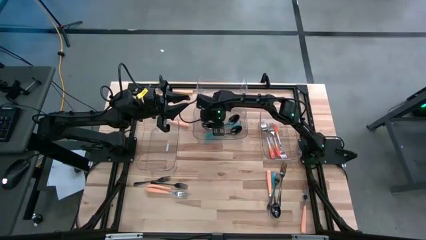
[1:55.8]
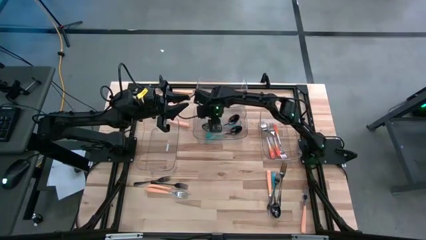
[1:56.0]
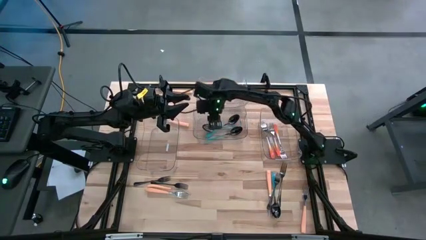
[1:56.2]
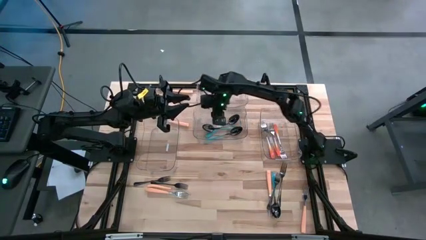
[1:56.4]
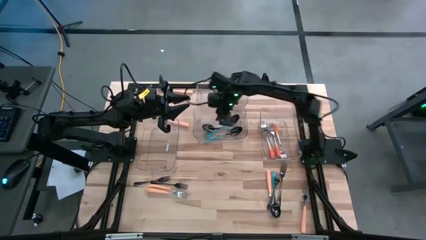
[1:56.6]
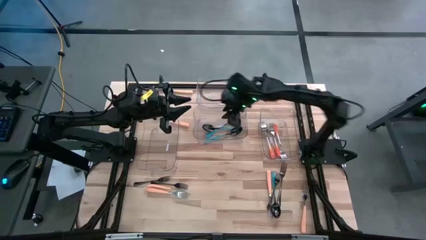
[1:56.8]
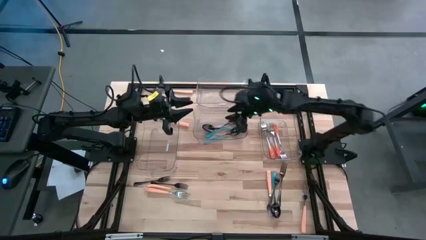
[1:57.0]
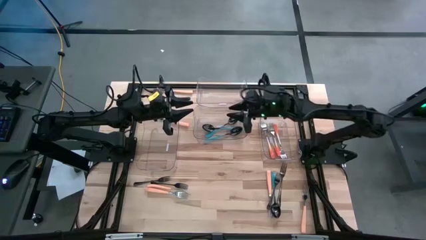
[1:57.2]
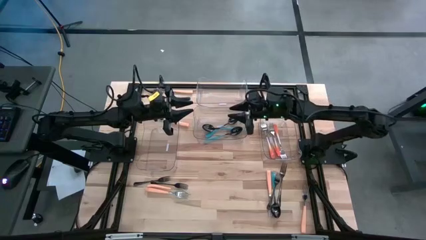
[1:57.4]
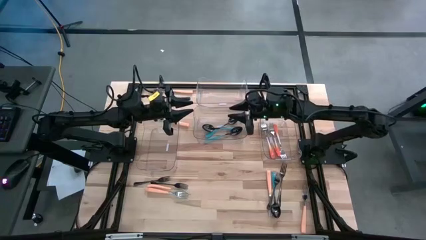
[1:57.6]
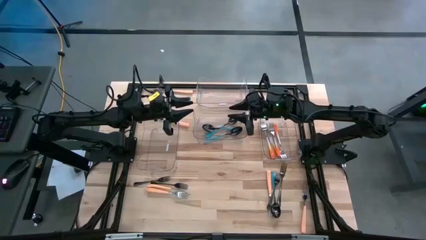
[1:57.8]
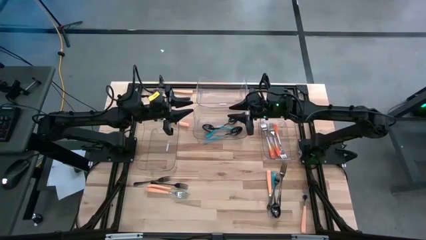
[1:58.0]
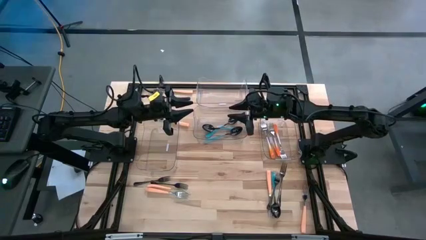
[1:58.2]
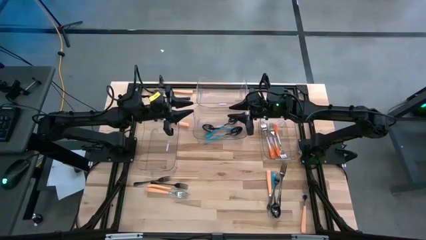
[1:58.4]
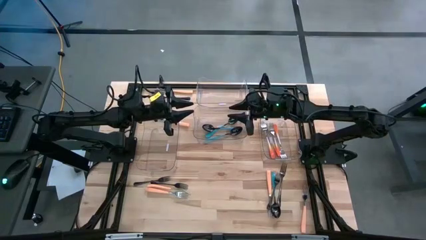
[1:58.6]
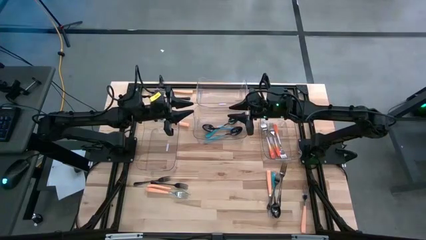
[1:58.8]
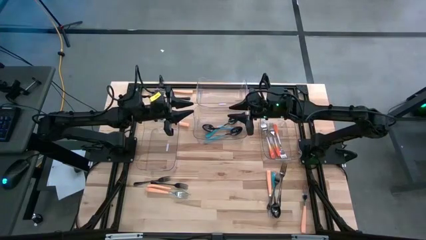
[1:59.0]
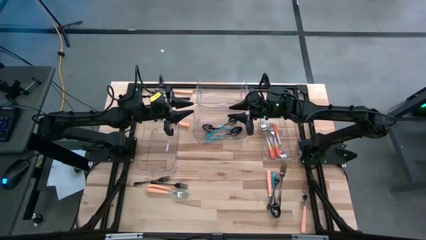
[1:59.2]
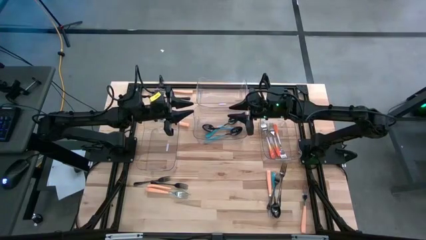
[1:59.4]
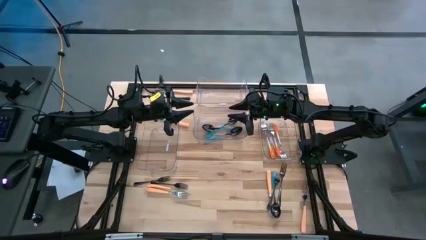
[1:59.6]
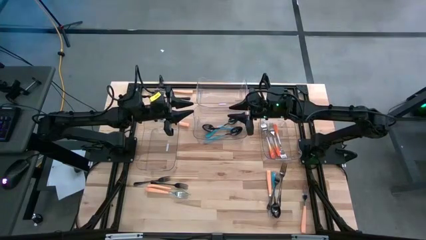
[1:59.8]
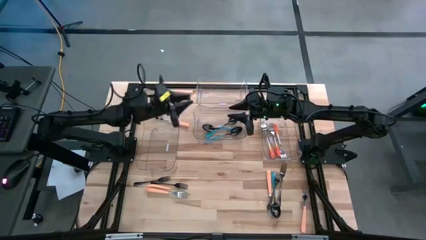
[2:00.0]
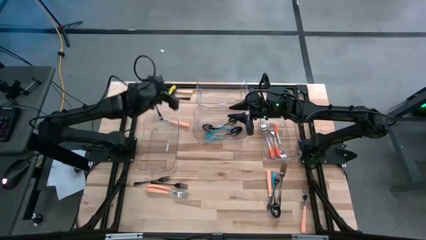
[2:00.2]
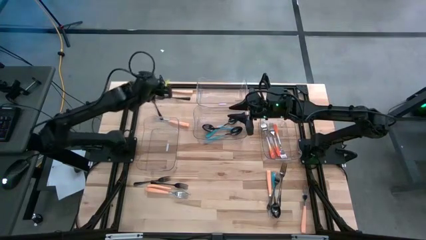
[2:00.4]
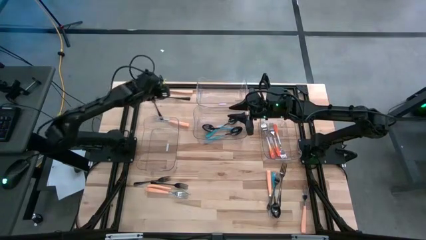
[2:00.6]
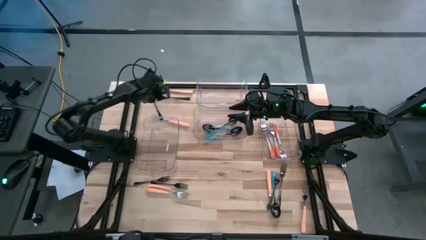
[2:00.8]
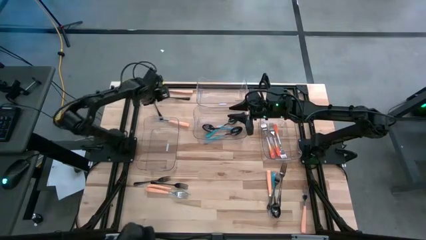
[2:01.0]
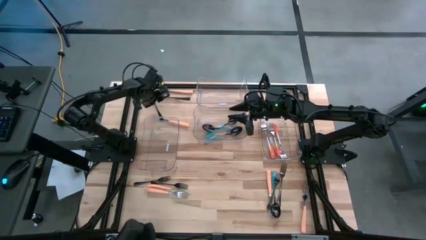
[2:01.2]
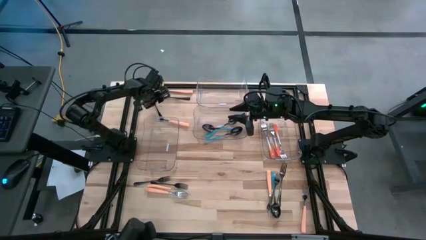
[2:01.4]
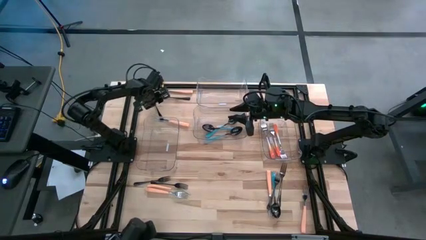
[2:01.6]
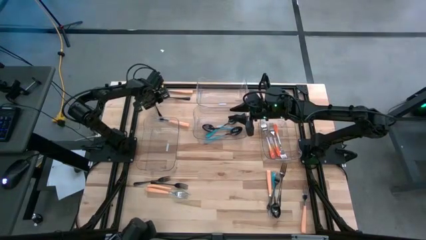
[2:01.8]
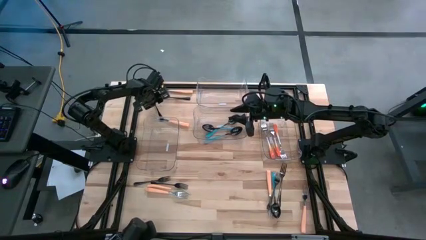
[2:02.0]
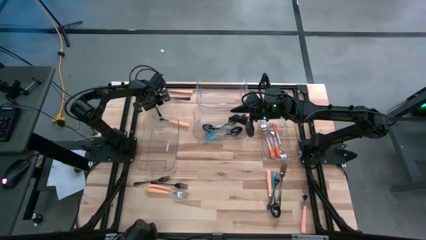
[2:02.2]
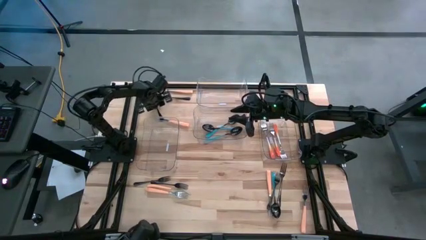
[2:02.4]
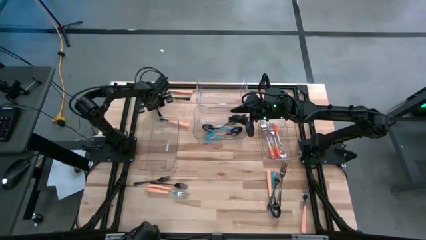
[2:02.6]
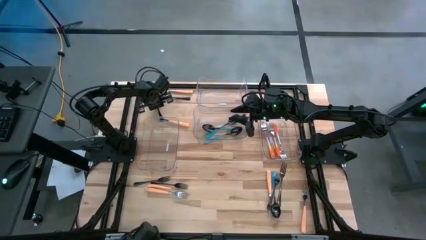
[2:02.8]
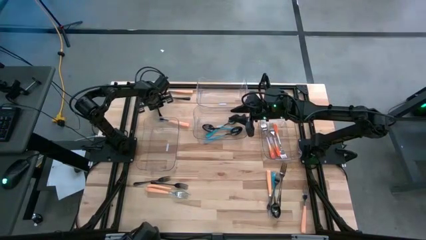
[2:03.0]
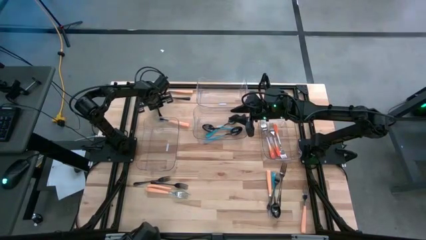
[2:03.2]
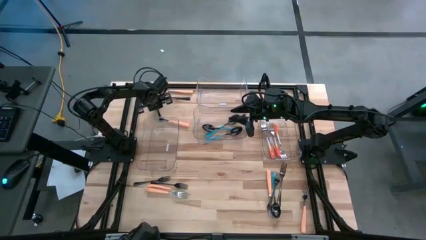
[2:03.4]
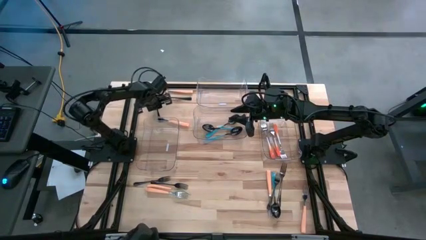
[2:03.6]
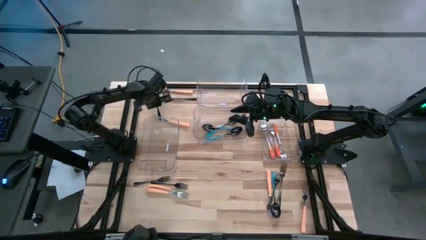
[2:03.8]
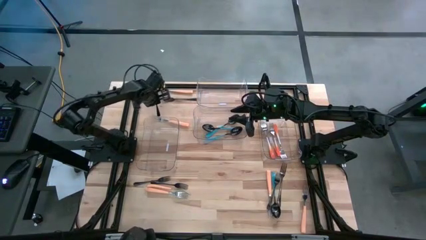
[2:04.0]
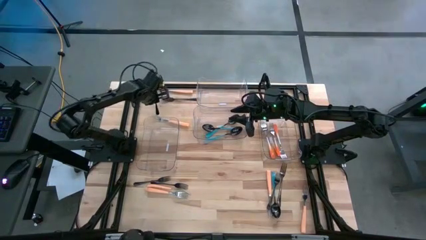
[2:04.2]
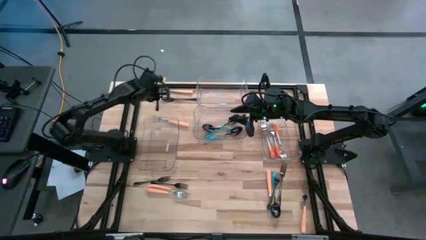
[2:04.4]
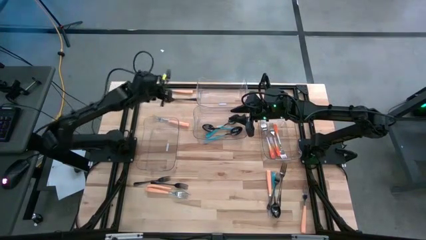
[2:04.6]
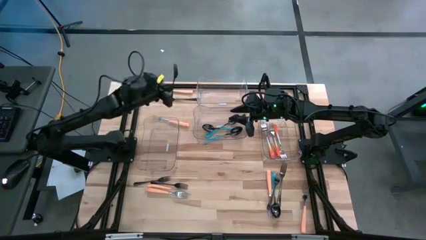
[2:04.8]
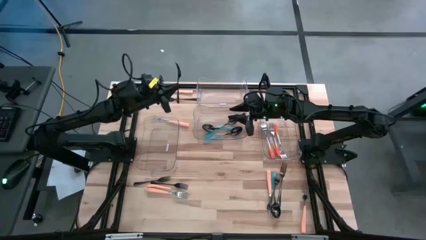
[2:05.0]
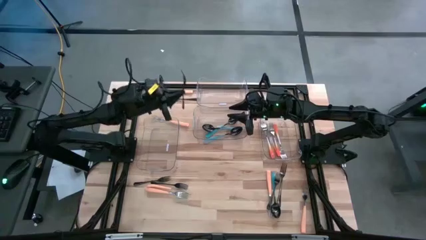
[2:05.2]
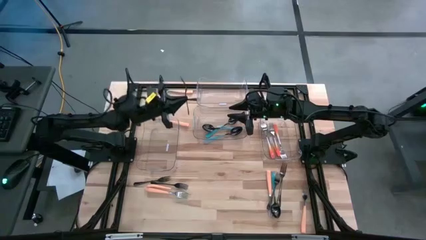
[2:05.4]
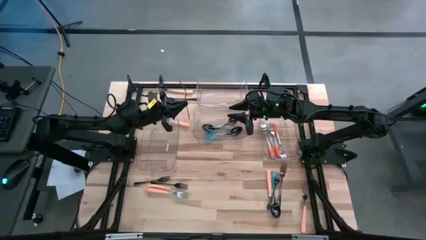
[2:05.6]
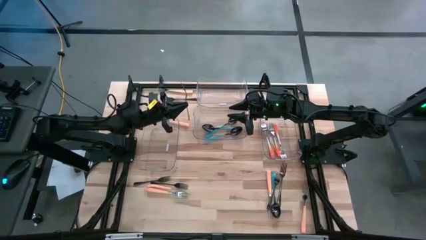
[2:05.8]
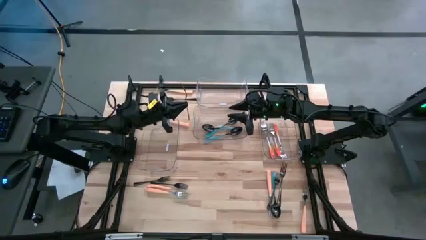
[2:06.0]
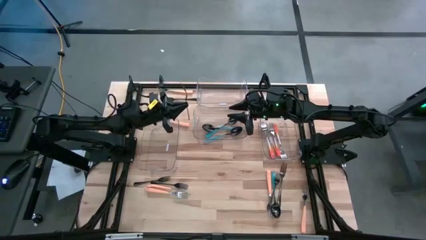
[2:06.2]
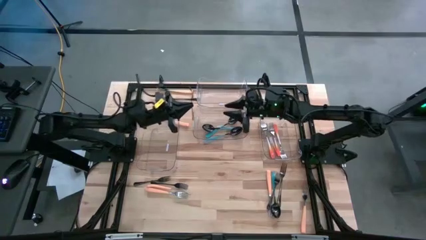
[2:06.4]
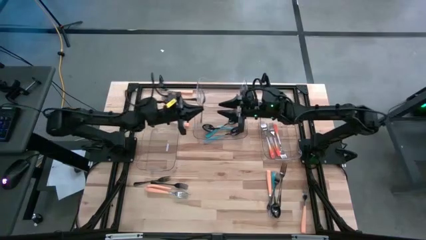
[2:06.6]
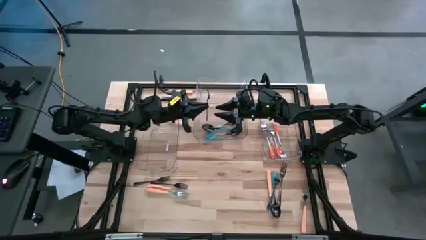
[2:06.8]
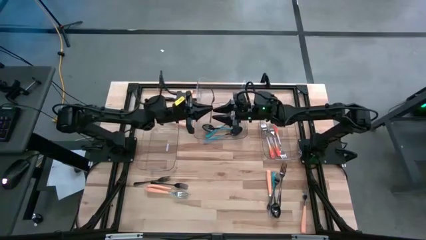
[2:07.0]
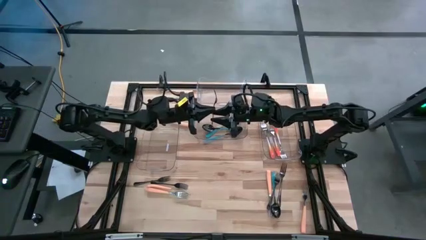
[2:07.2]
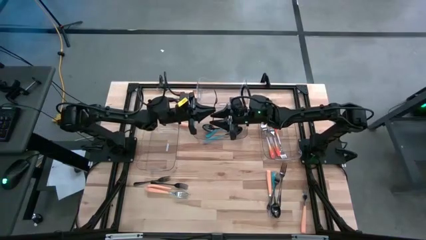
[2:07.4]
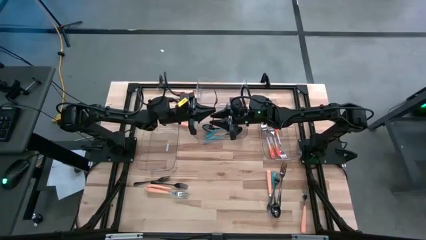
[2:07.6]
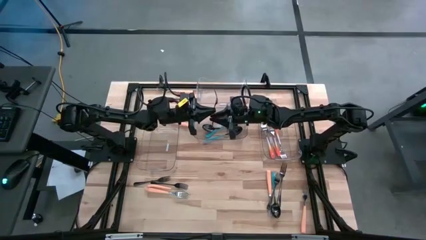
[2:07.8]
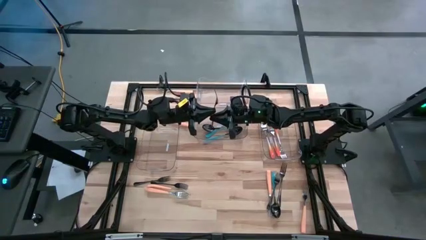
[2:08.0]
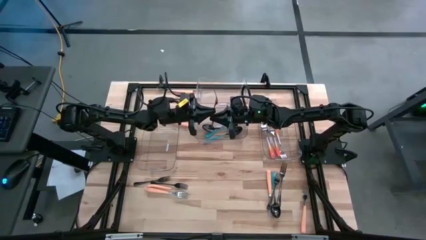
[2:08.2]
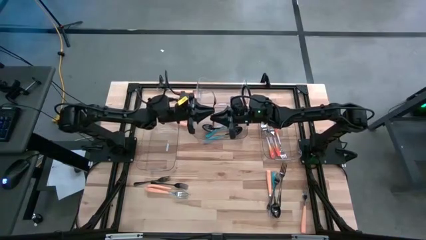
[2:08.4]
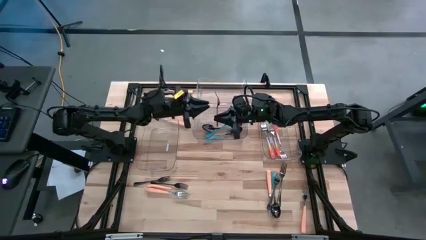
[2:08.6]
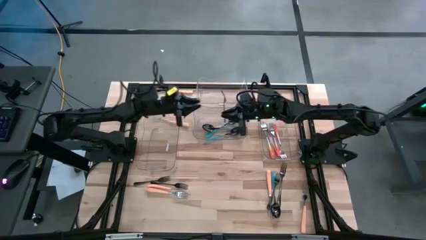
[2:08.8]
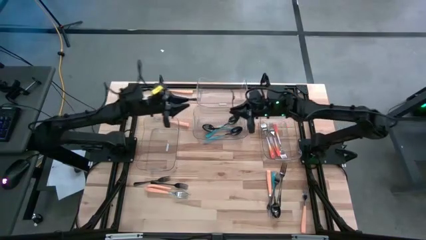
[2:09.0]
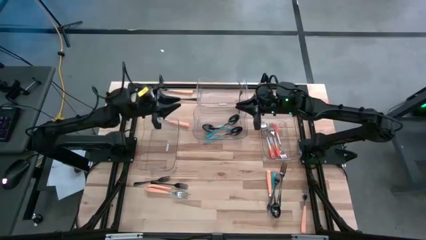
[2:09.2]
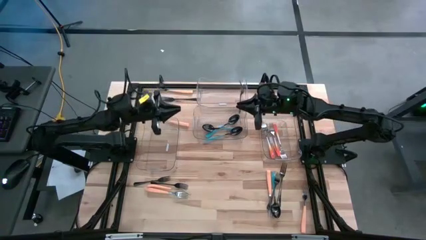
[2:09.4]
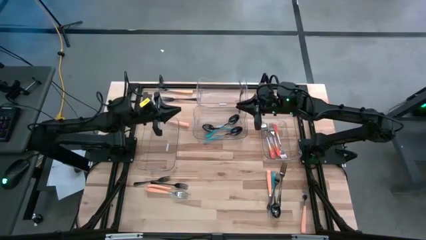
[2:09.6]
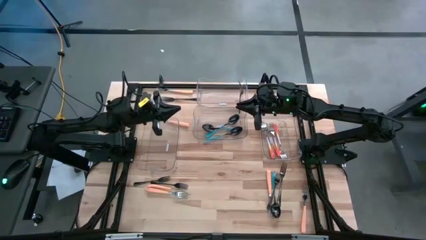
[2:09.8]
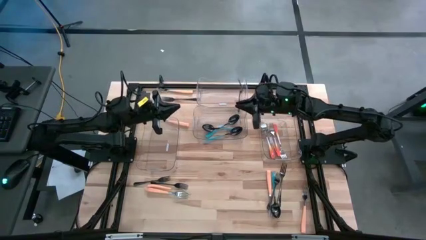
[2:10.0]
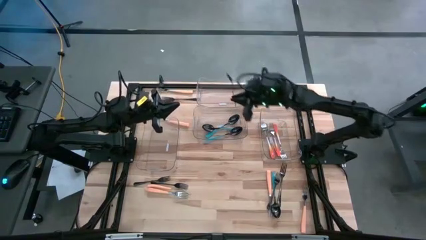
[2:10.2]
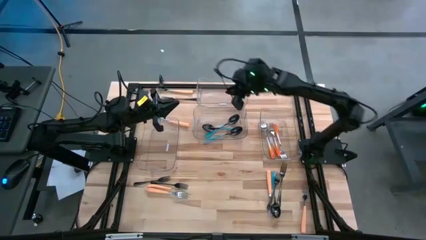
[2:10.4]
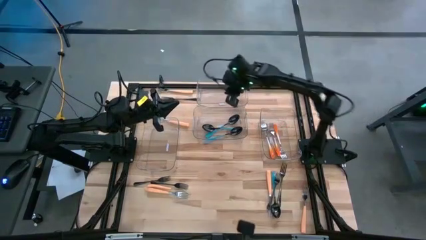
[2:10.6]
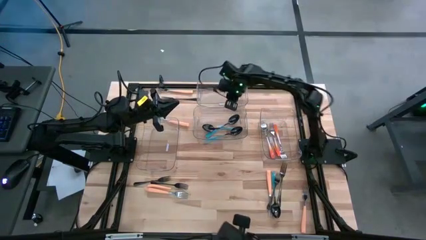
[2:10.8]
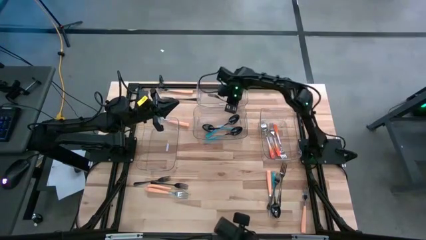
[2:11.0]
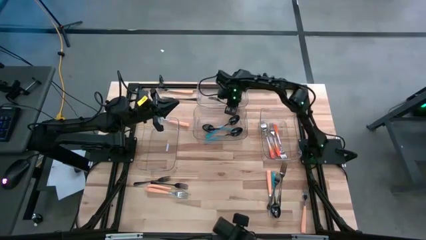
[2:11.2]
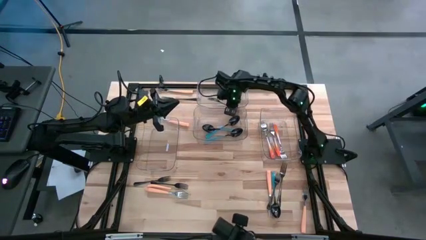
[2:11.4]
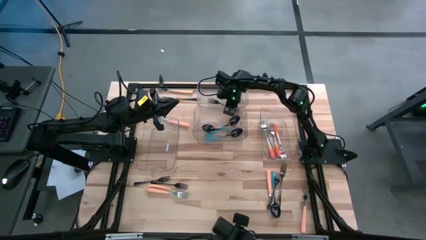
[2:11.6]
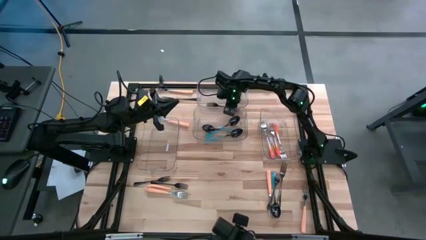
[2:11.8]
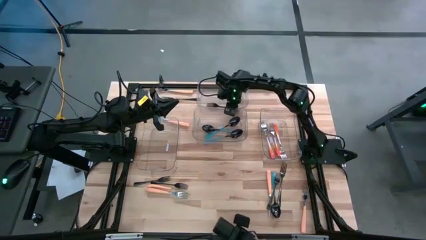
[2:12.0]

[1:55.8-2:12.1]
Task: Sort silverware by color (type)
Put the black fork into the top transparent bin
